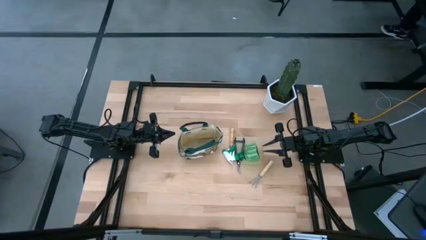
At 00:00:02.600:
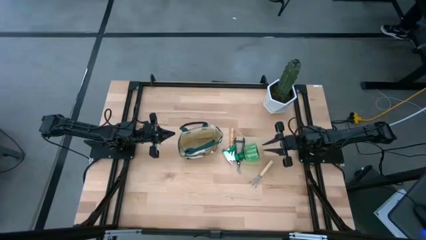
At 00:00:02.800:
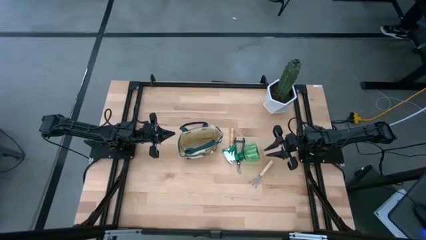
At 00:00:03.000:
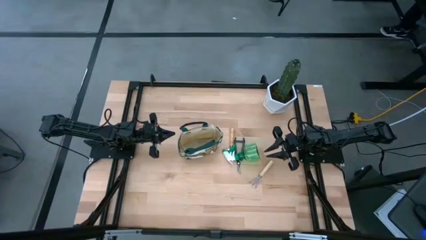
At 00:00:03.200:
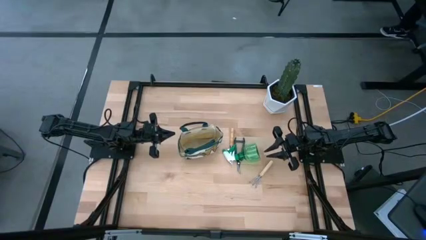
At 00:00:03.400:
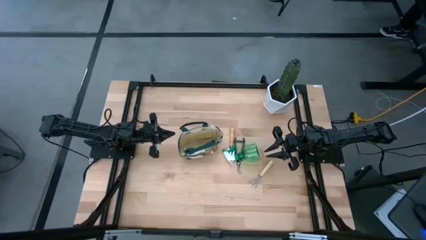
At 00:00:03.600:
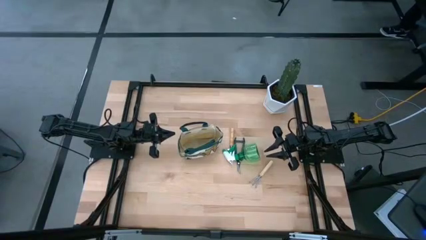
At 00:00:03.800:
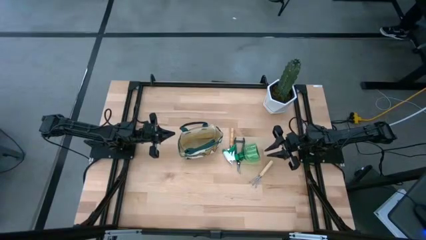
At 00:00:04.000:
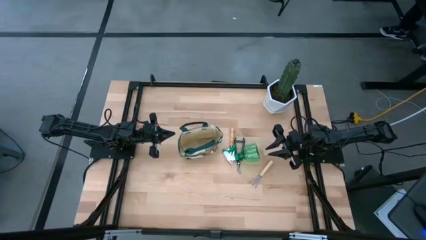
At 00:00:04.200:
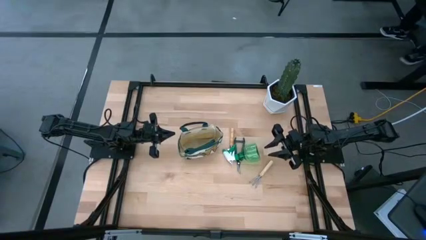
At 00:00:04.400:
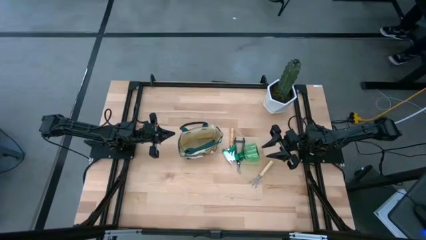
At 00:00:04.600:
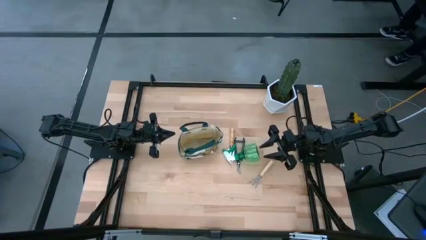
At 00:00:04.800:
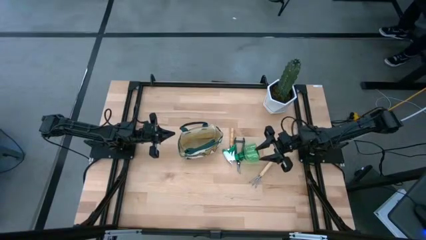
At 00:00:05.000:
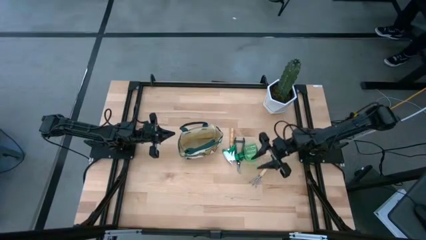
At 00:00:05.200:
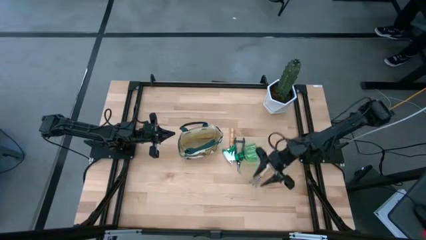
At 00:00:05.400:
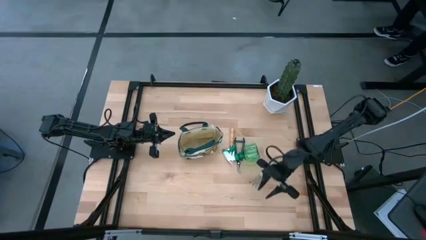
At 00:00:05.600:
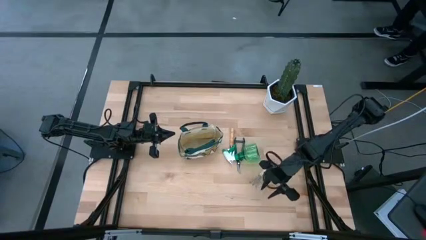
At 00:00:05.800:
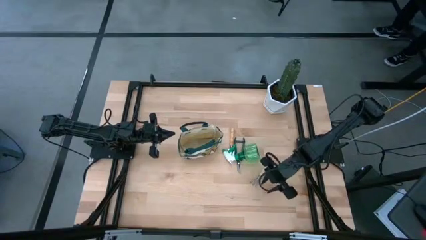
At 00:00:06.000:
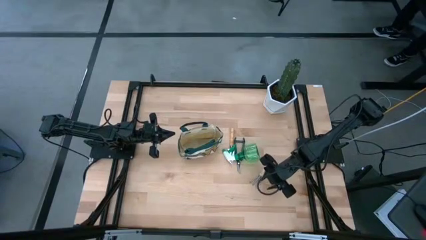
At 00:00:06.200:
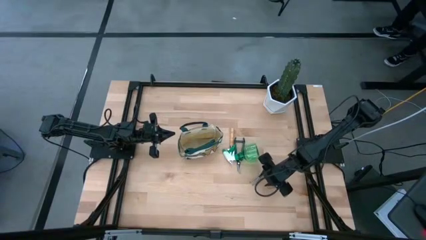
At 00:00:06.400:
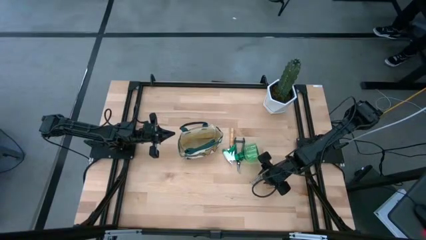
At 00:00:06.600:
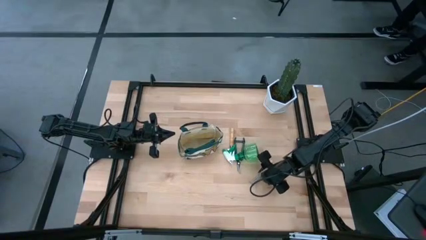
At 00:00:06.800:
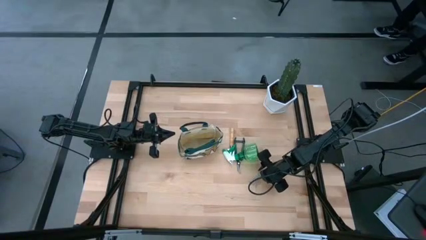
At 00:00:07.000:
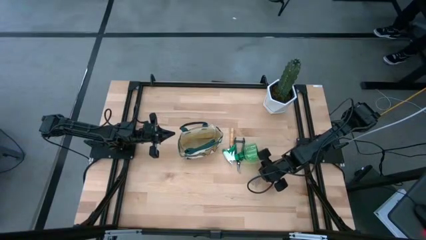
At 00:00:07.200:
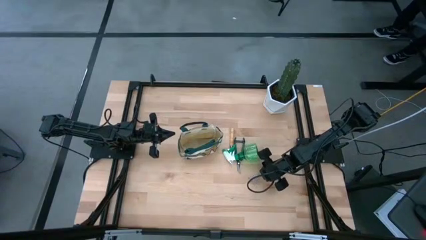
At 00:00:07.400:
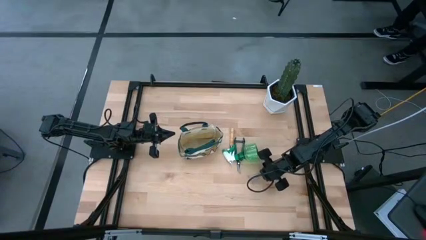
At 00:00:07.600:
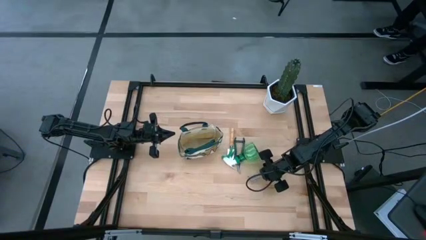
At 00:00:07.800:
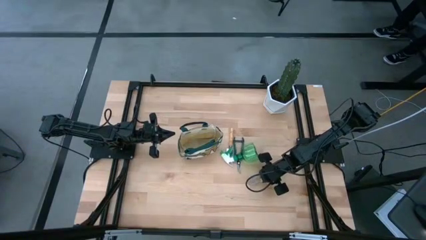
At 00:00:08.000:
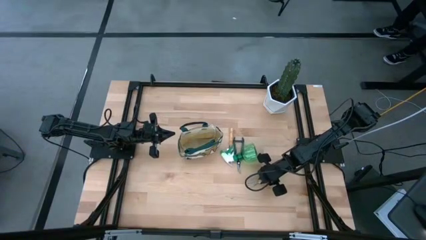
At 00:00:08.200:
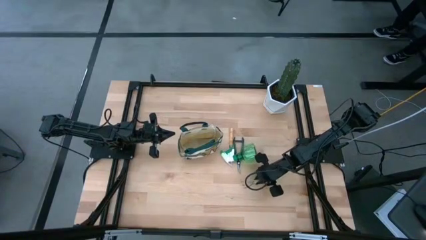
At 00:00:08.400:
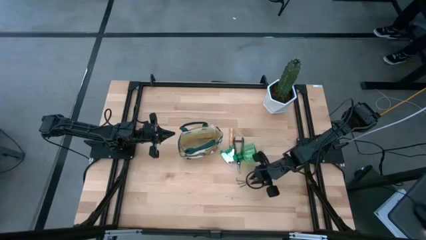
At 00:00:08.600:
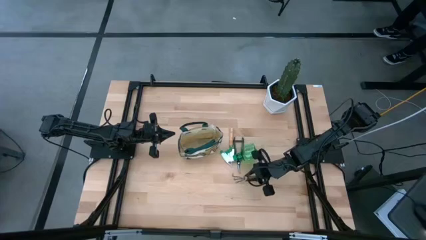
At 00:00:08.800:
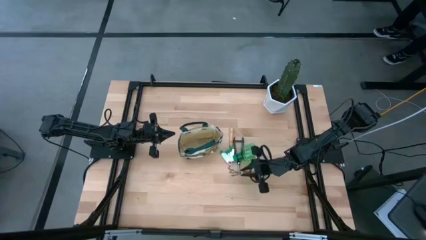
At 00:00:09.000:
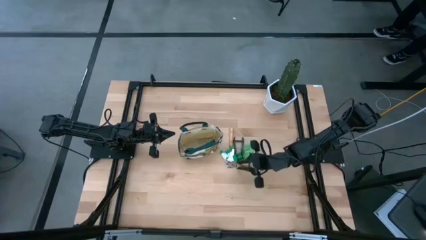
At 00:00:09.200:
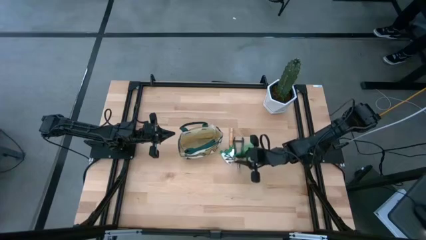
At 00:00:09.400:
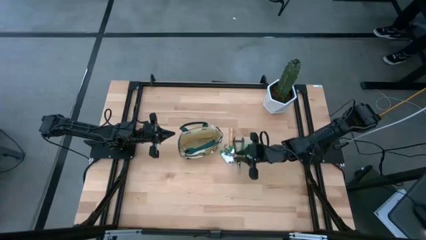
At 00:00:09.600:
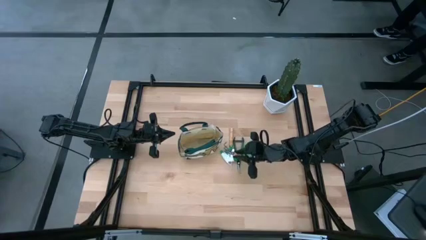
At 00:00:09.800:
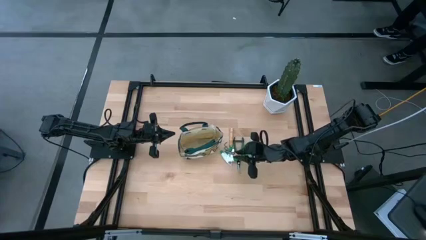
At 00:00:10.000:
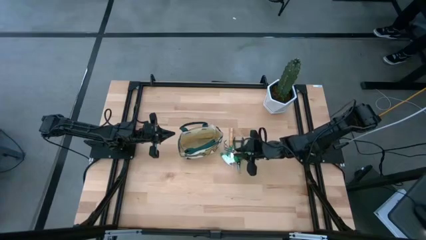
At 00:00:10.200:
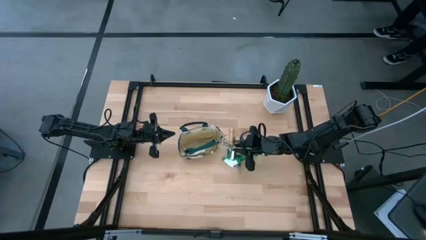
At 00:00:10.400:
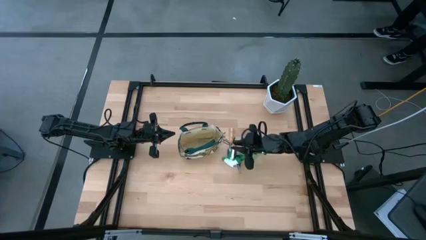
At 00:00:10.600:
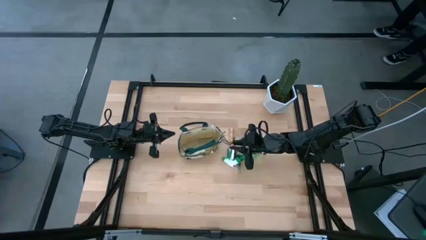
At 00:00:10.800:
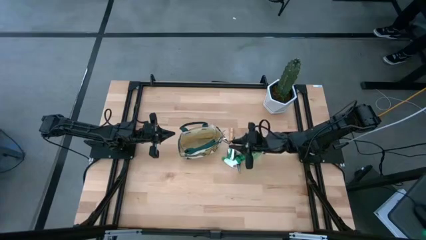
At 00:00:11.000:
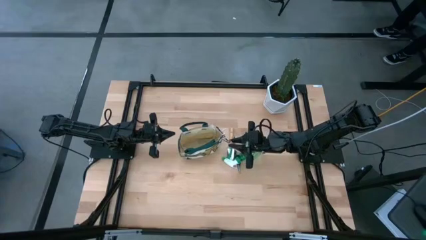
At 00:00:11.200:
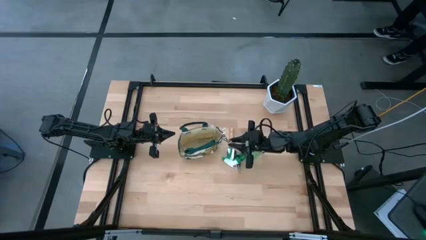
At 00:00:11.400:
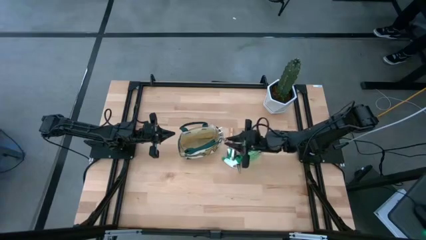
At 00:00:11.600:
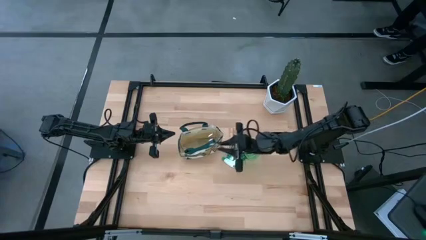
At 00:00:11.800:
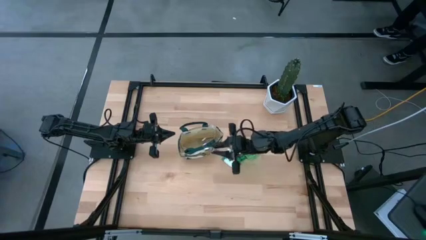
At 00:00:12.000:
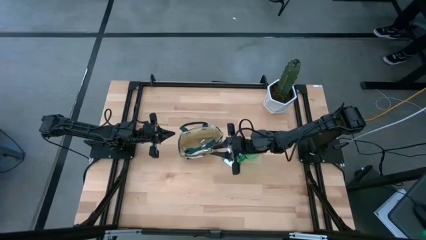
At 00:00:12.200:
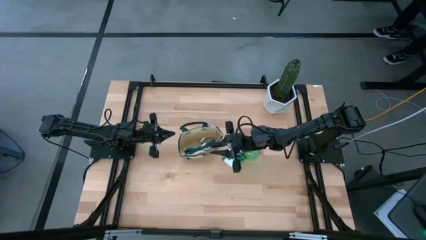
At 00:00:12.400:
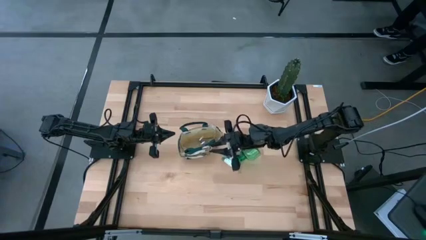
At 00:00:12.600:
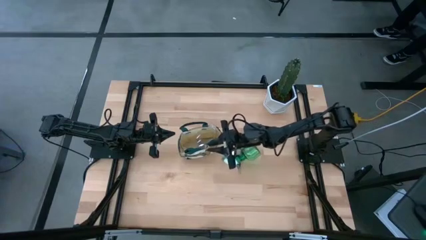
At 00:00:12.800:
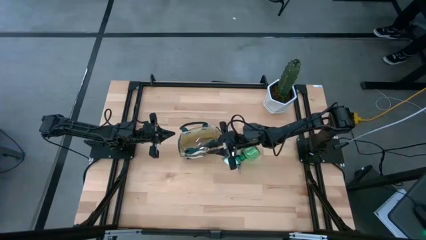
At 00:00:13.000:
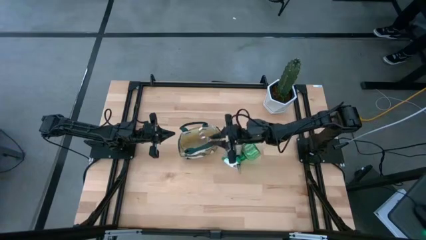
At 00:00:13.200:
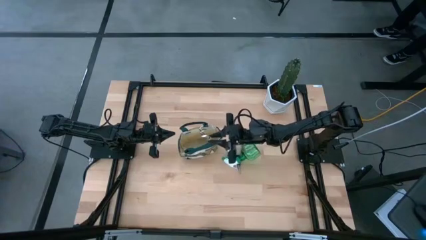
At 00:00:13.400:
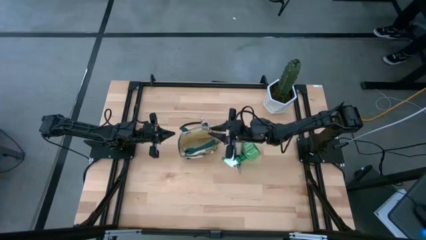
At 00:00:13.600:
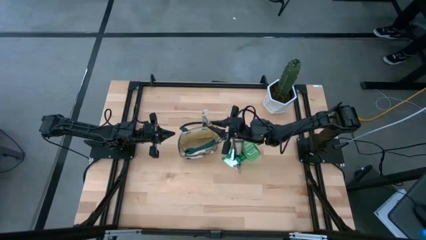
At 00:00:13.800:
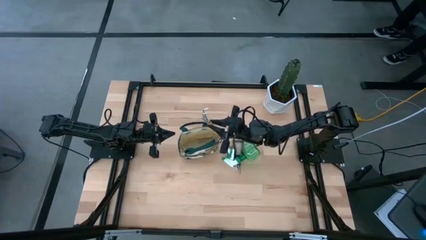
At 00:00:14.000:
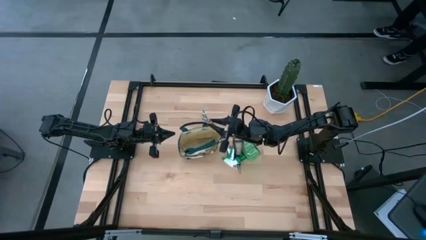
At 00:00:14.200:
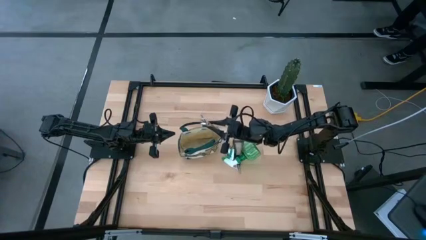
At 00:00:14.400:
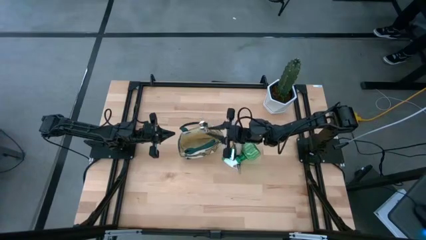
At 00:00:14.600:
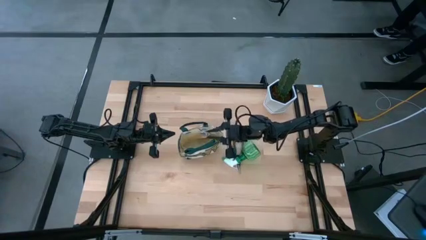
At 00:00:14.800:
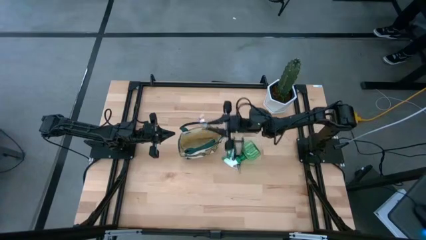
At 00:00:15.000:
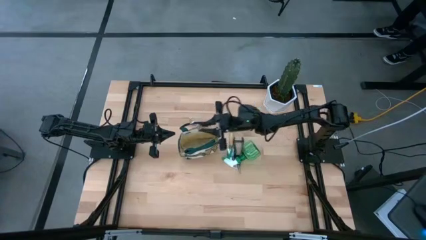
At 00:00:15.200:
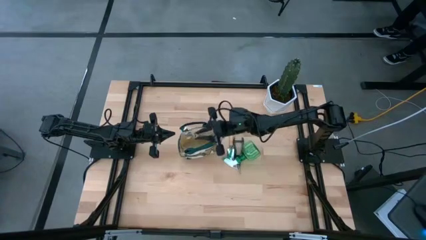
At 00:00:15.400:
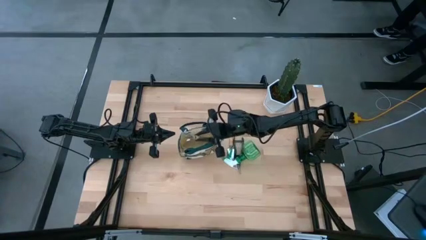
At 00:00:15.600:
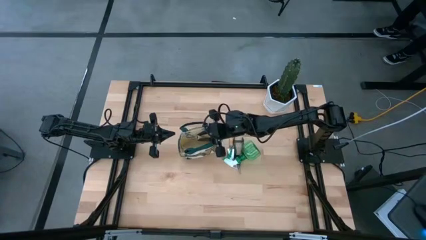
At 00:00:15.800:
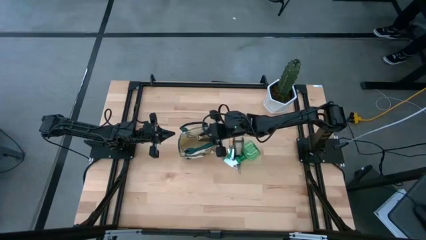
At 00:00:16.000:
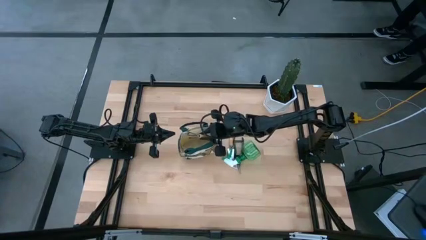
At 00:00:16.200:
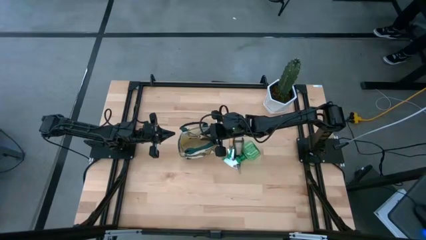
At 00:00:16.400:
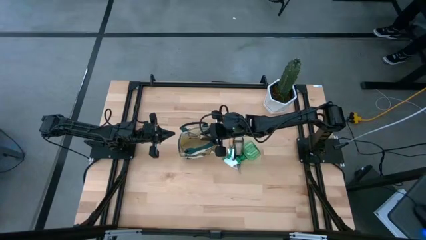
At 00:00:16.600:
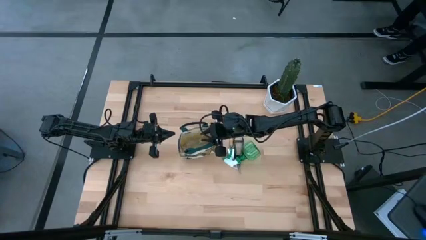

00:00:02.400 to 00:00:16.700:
Task: Pick & Place Garden tools in Gardening bag
Put the hand rake into the gardening bag
